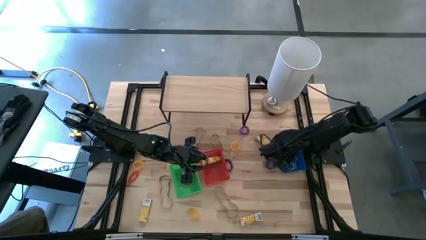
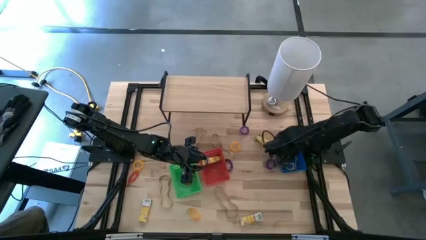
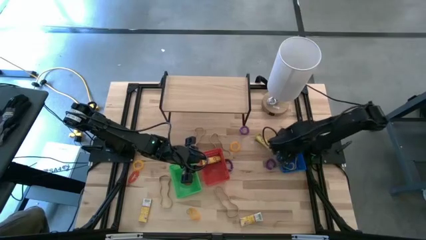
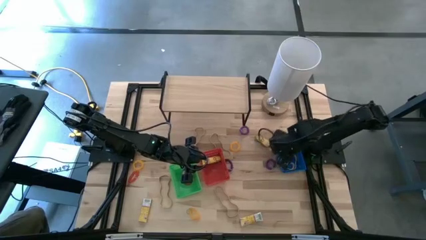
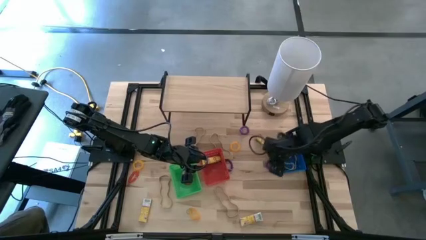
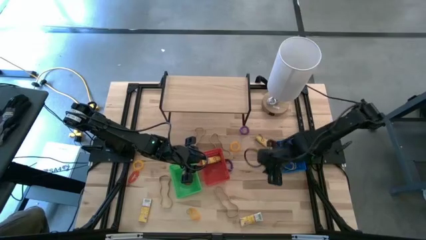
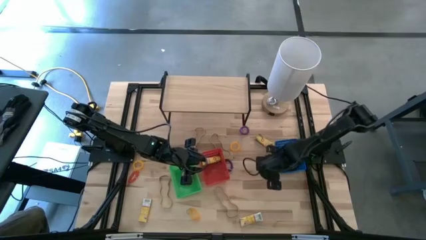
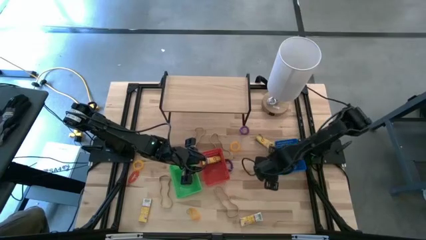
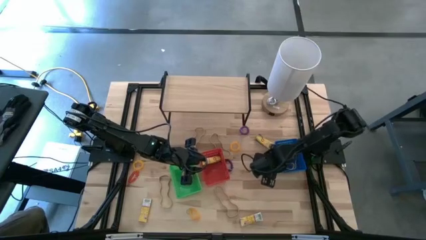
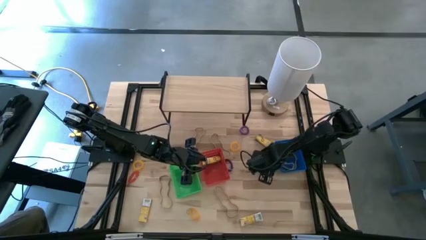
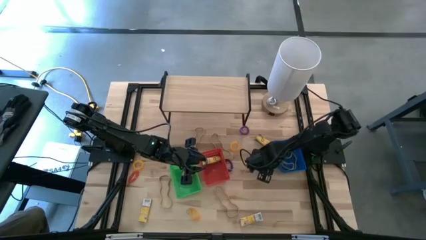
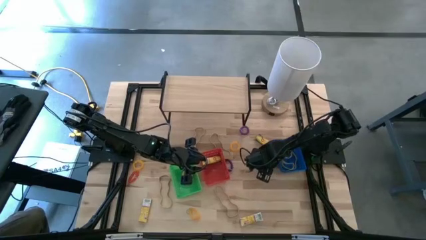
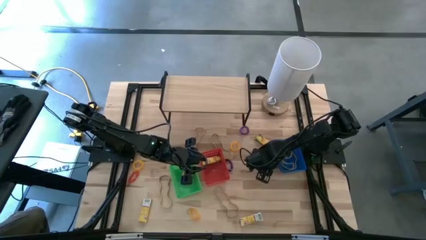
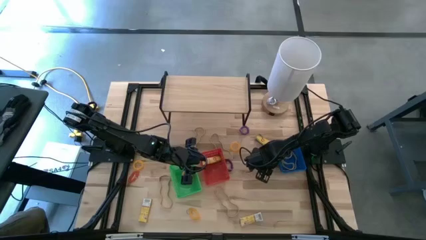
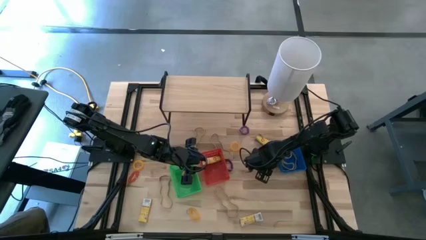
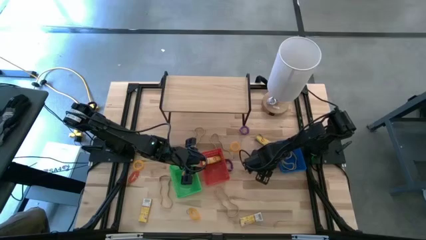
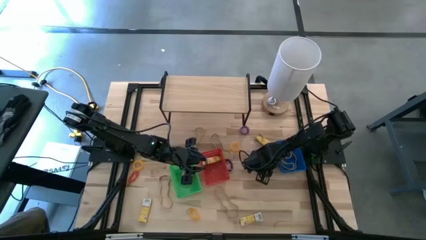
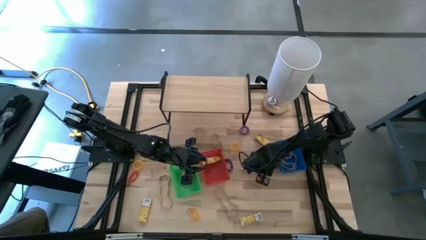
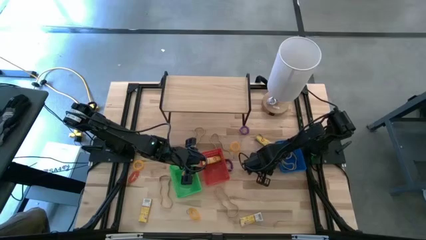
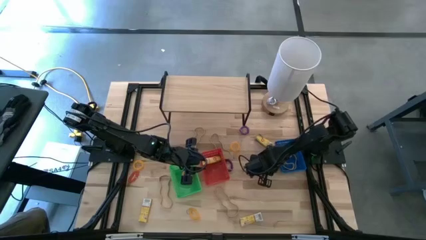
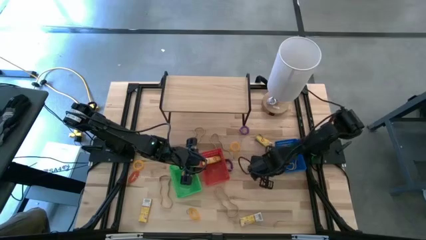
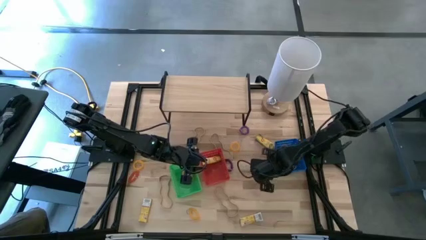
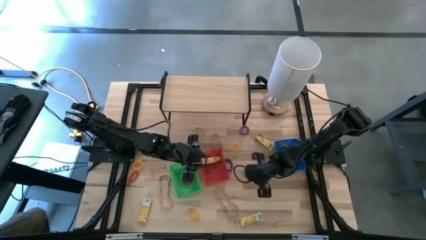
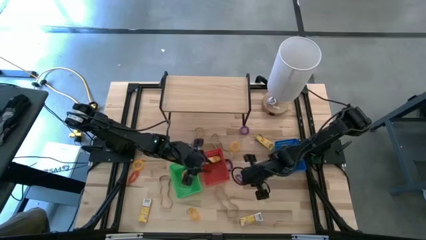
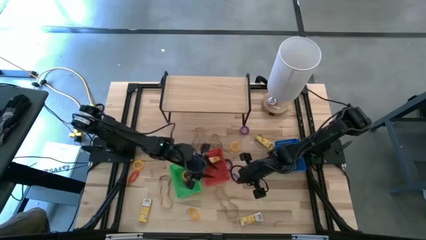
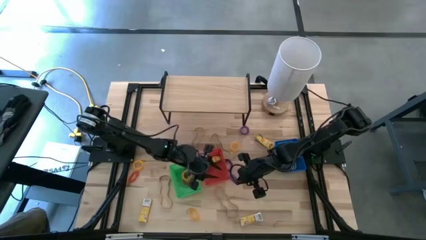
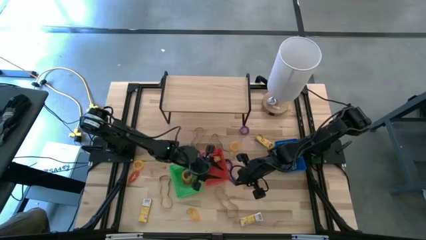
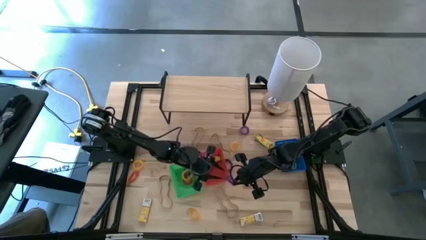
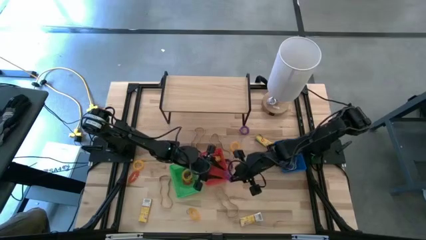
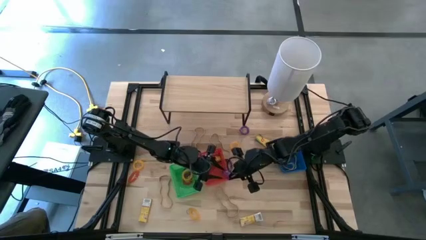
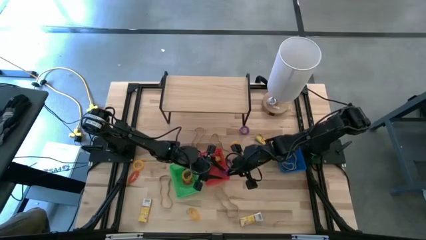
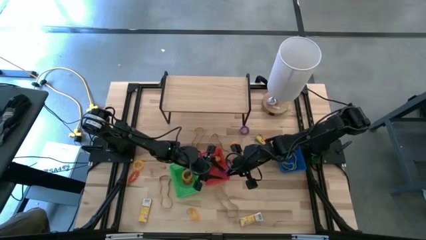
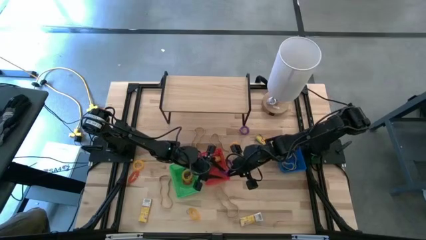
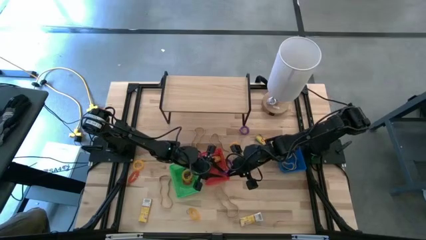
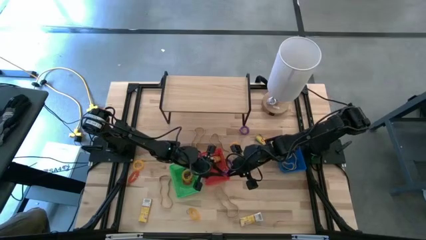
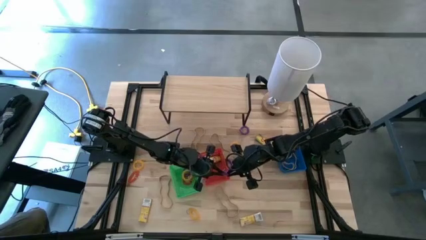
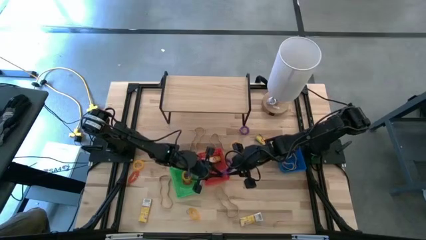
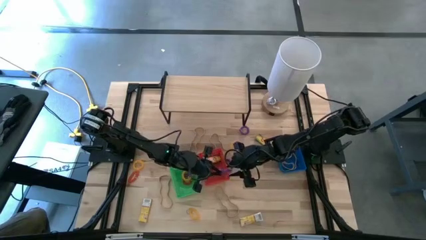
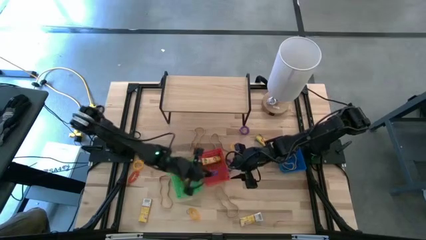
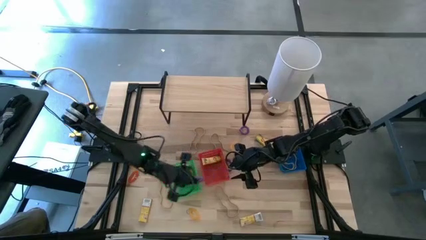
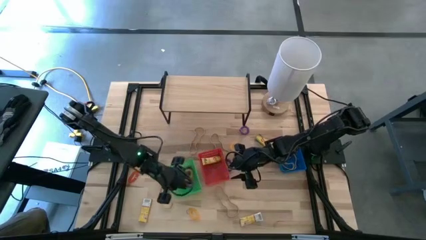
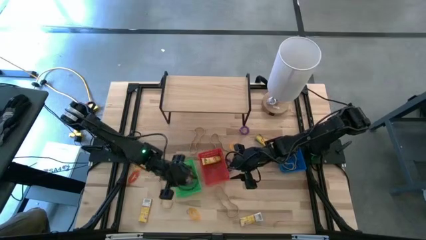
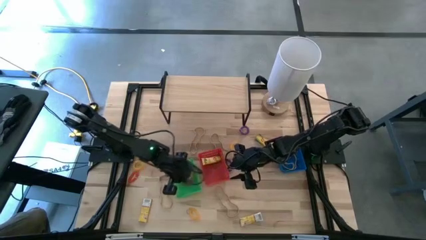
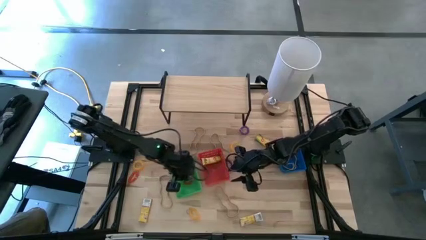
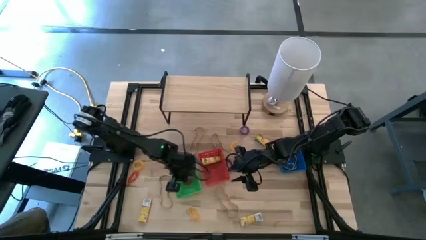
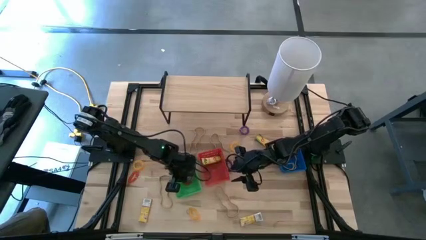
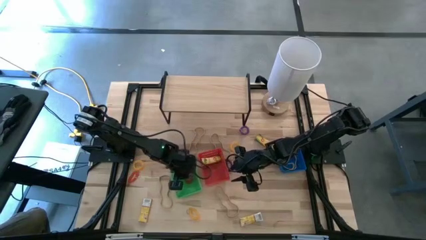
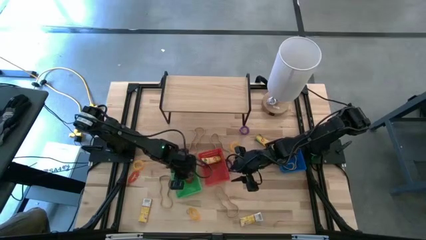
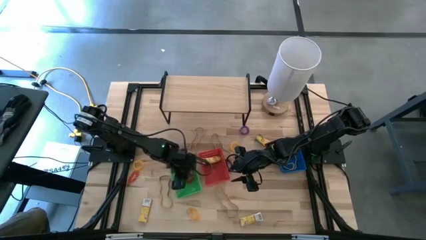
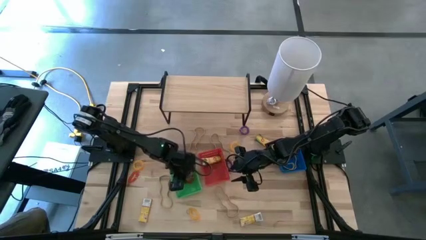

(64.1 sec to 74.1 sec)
Task: Pick & Place Office Desk Supplies
Put the violet spring keychain into the green bin
